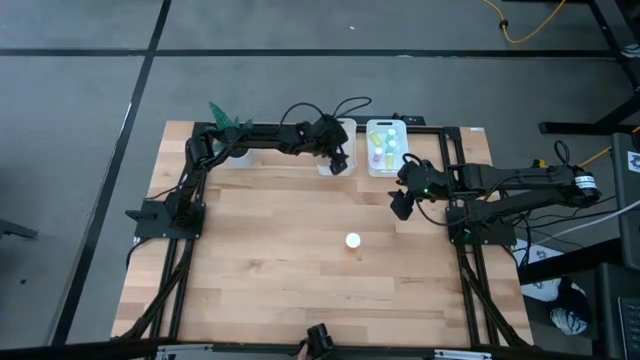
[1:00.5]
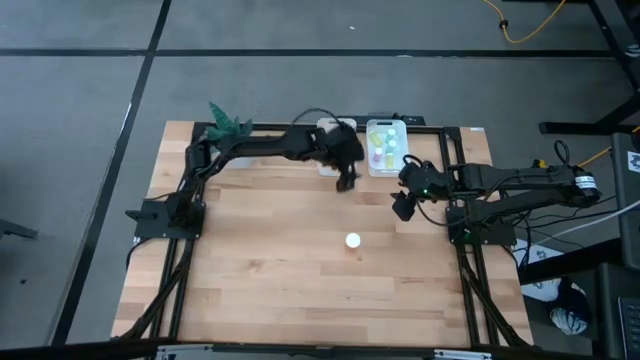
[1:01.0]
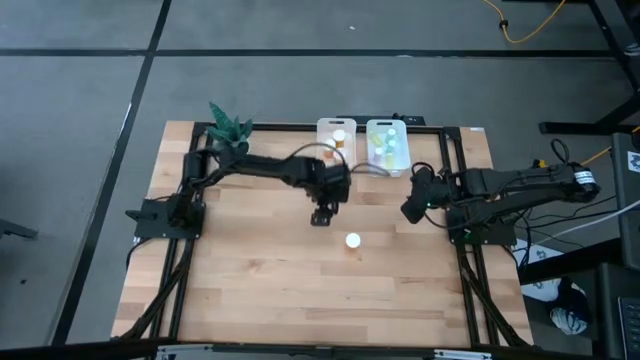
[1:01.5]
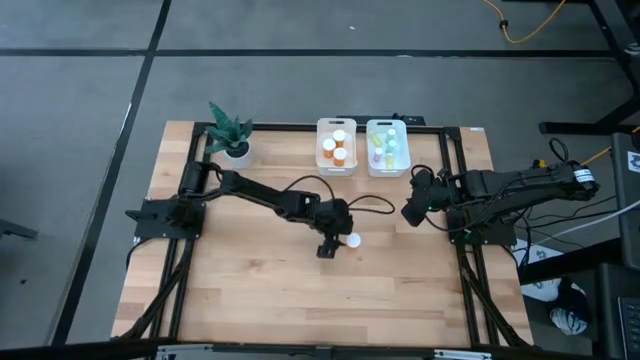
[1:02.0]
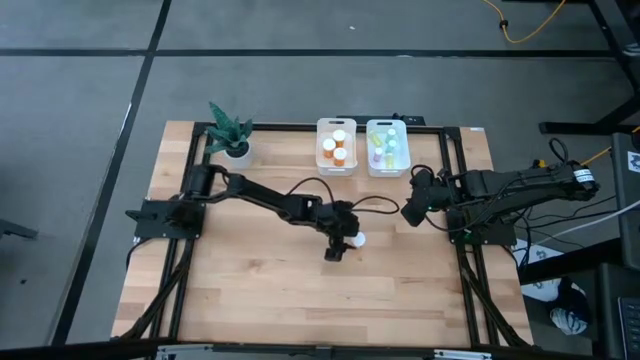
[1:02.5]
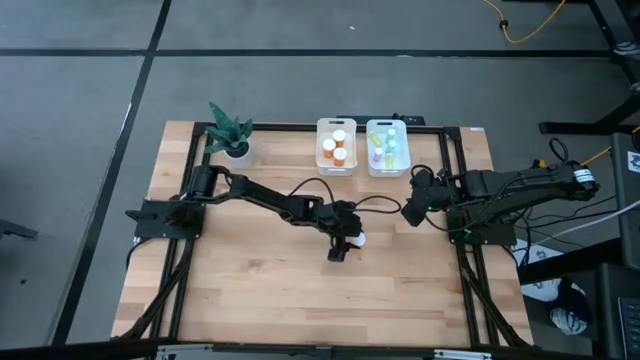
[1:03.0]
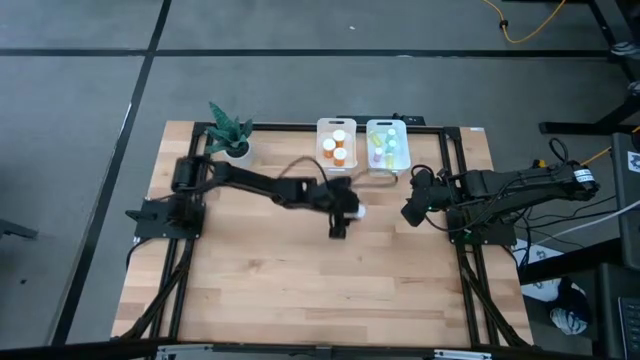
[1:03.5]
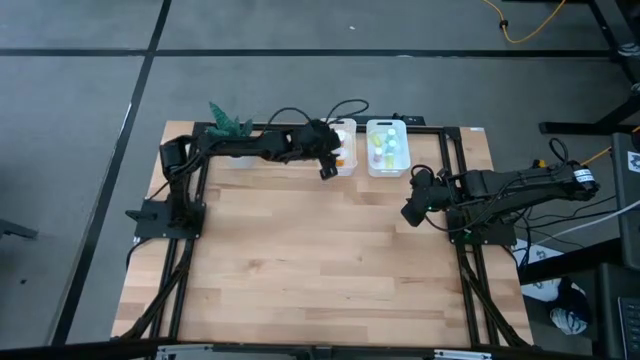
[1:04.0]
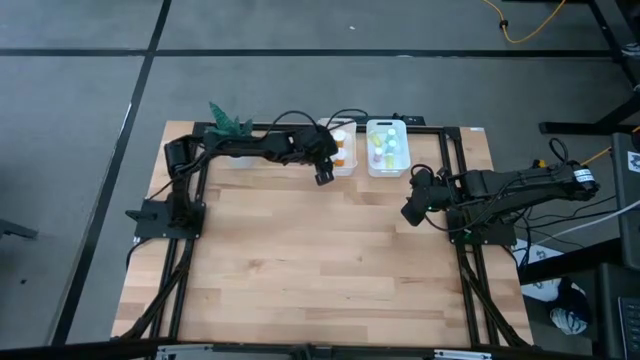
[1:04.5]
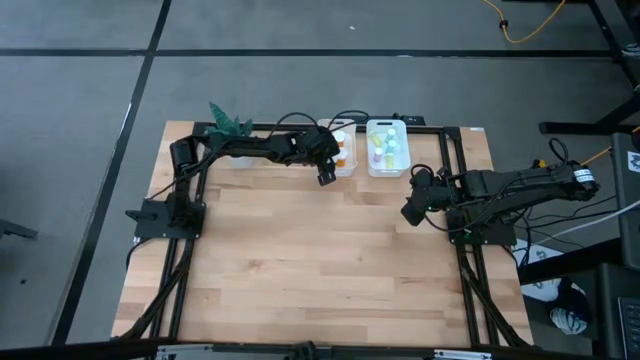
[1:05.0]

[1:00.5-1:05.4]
Task: Pick and place medicine bottles into bin by pill shape (circle, oval)
Put the large orange pill bottle into the left white bin

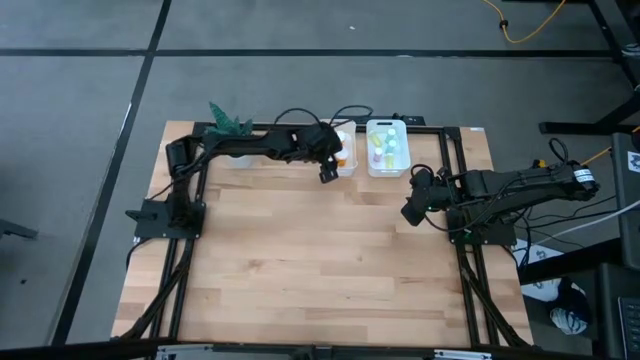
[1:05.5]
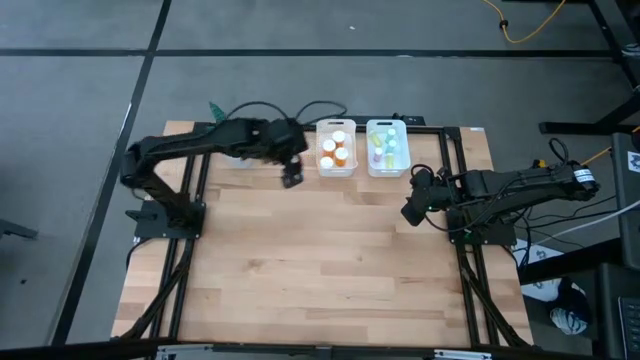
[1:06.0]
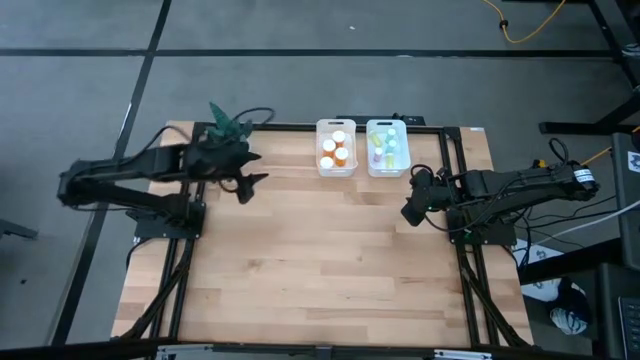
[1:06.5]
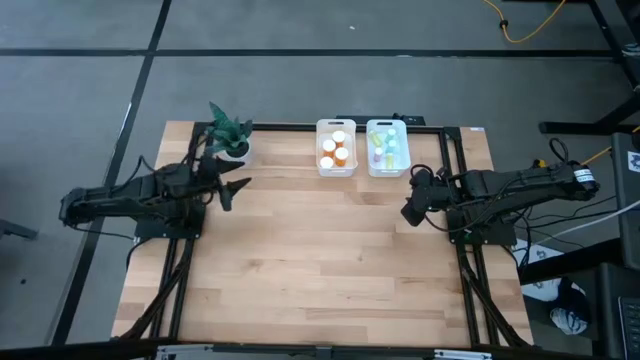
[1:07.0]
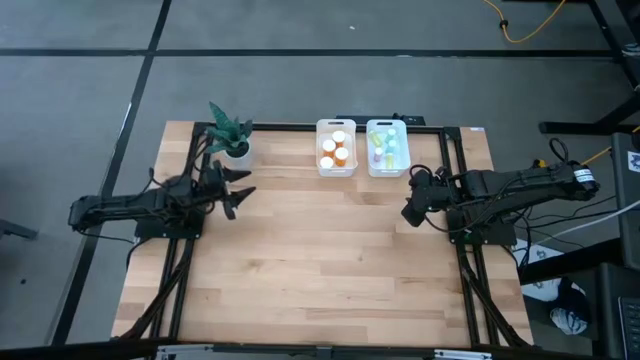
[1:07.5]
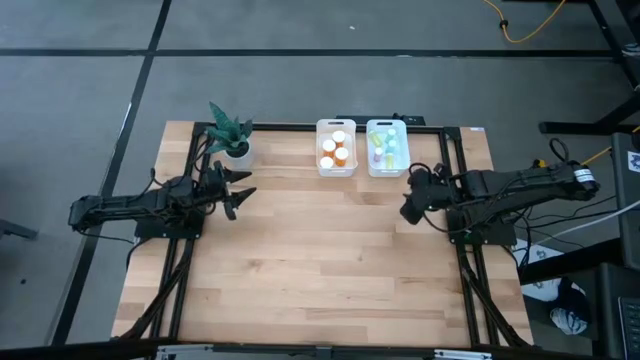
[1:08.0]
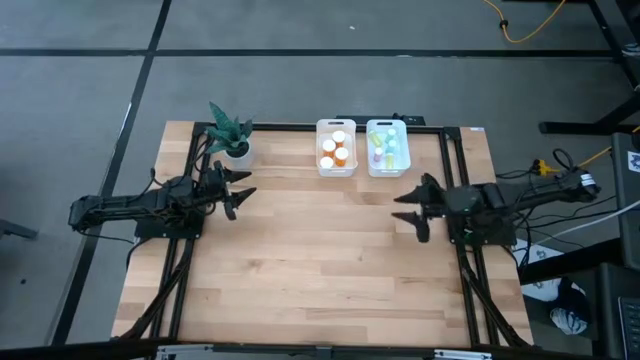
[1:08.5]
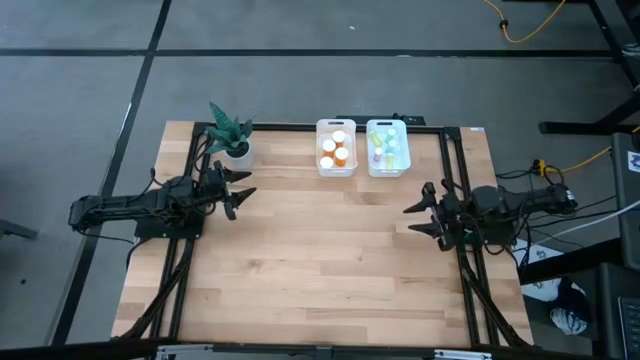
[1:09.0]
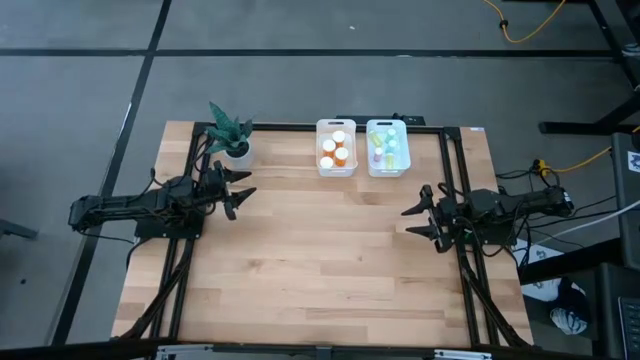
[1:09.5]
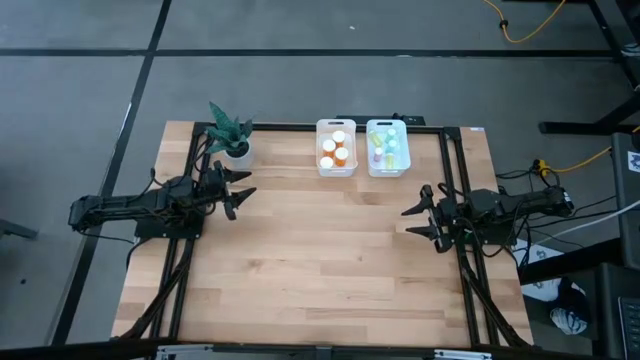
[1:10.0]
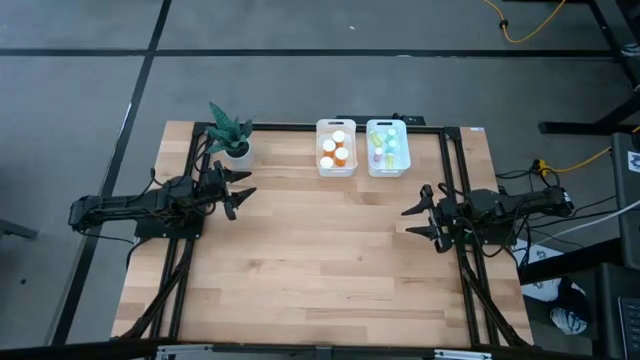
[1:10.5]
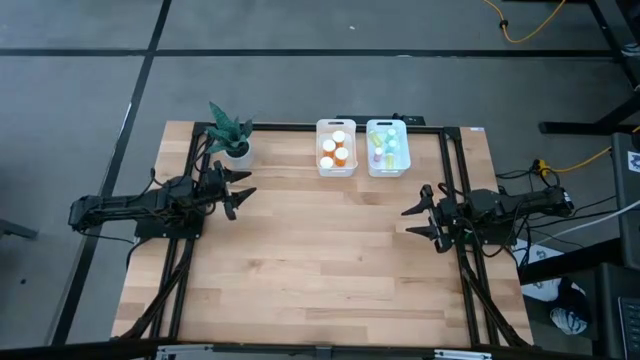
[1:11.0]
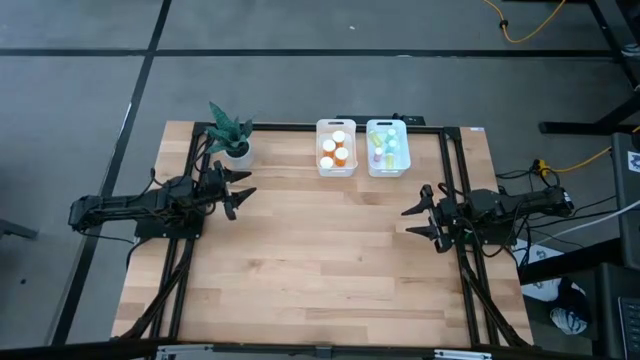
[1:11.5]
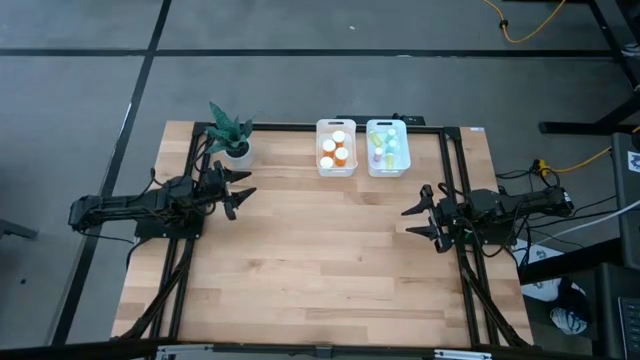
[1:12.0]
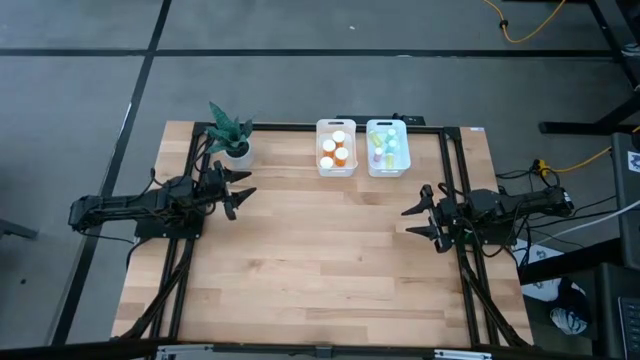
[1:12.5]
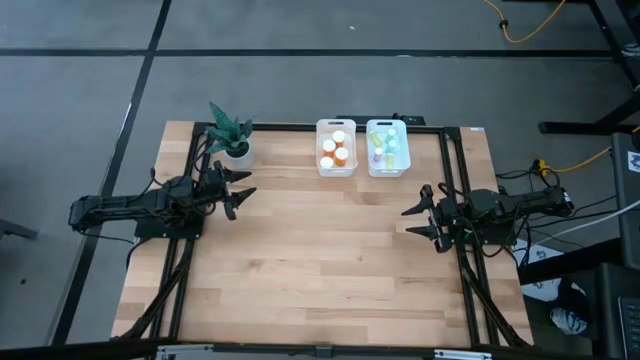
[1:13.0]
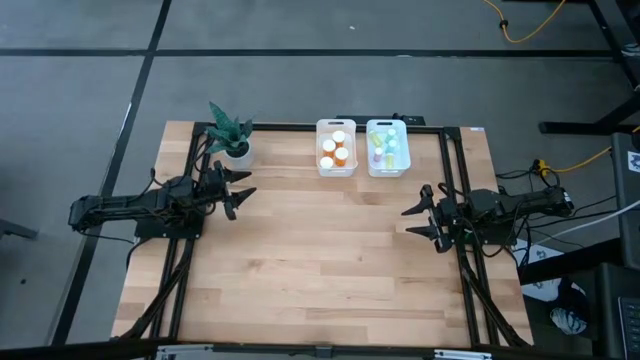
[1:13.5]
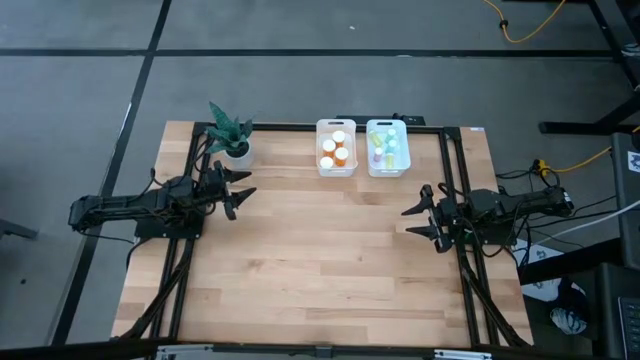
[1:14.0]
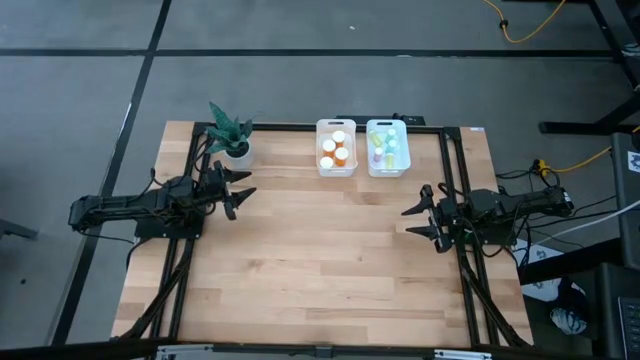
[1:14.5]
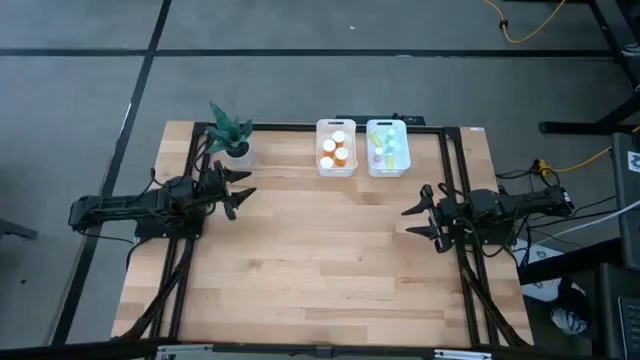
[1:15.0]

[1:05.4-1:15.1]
Return to Home Position

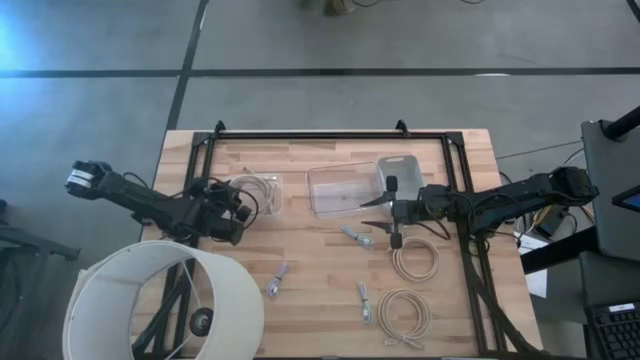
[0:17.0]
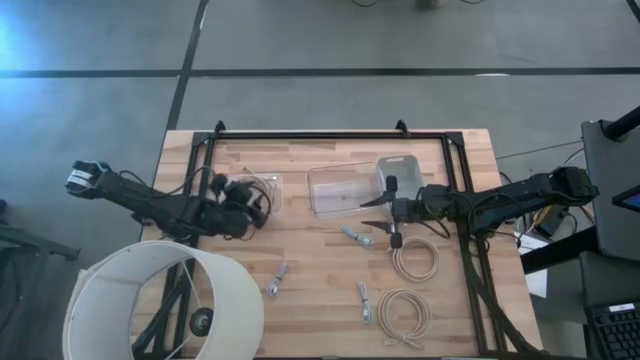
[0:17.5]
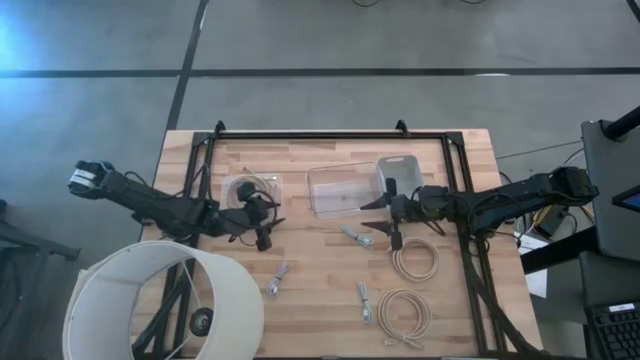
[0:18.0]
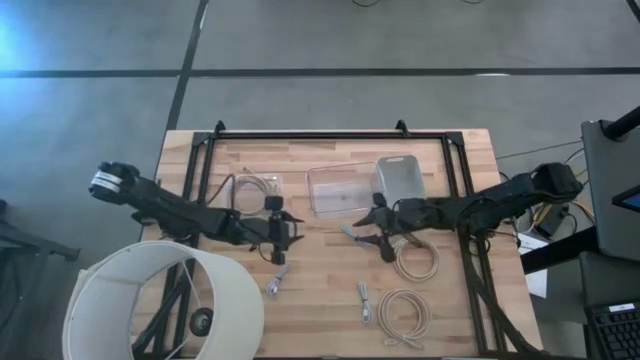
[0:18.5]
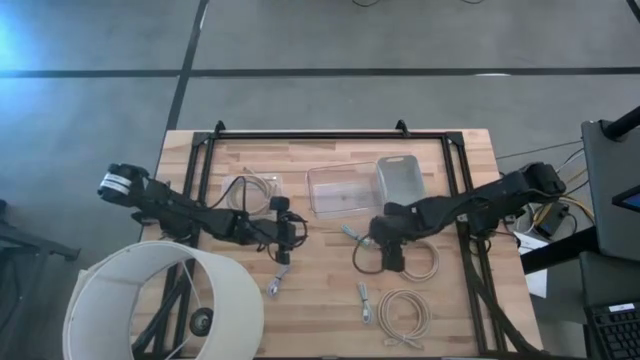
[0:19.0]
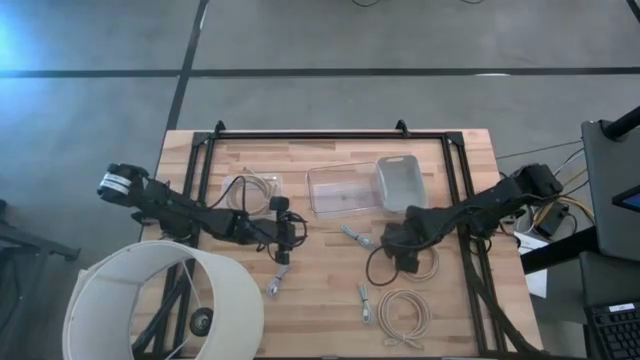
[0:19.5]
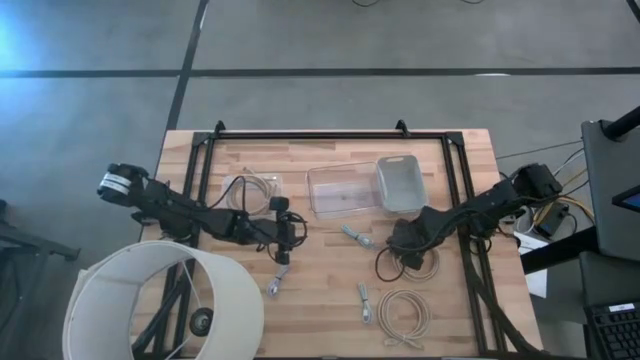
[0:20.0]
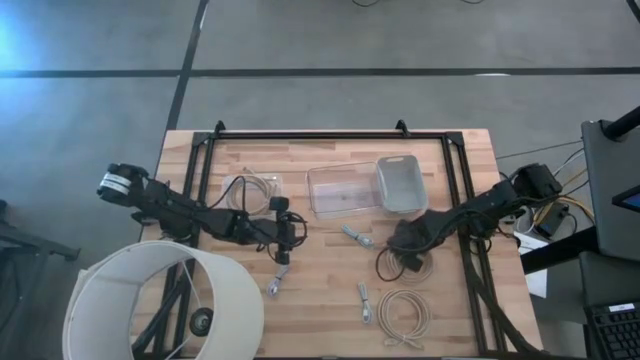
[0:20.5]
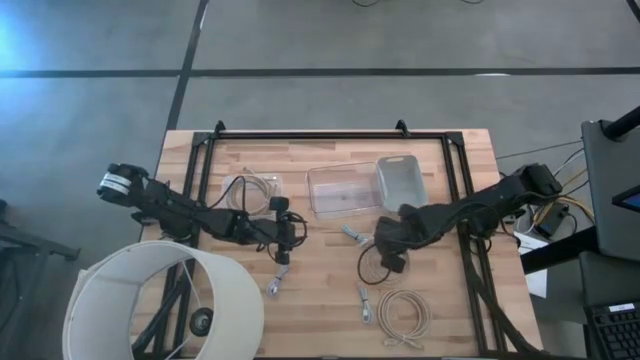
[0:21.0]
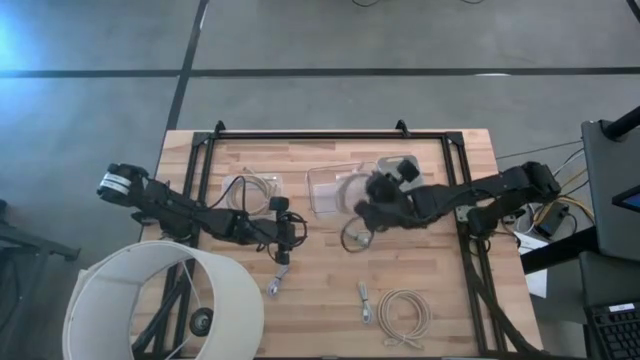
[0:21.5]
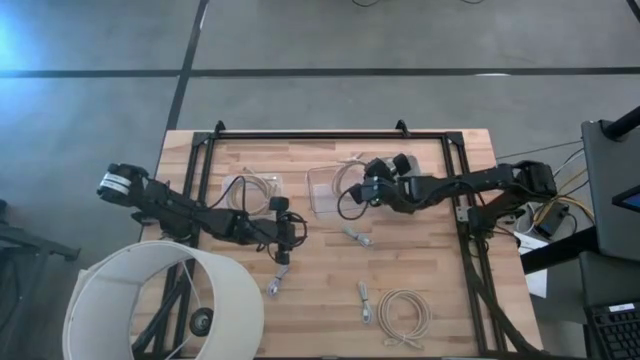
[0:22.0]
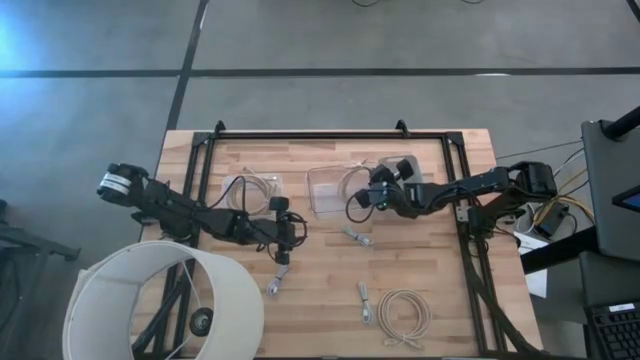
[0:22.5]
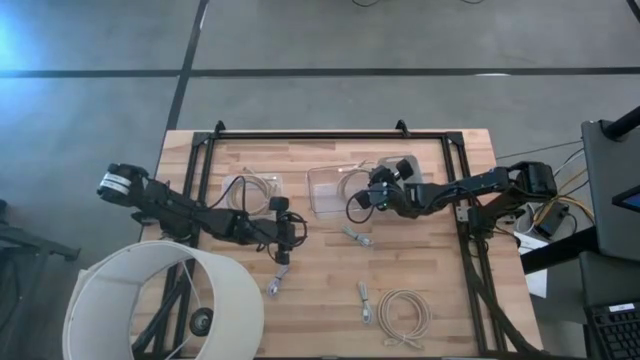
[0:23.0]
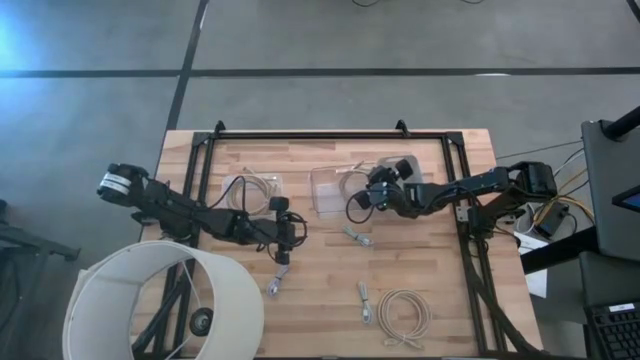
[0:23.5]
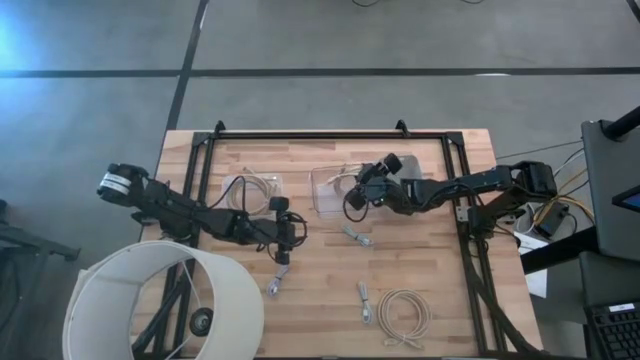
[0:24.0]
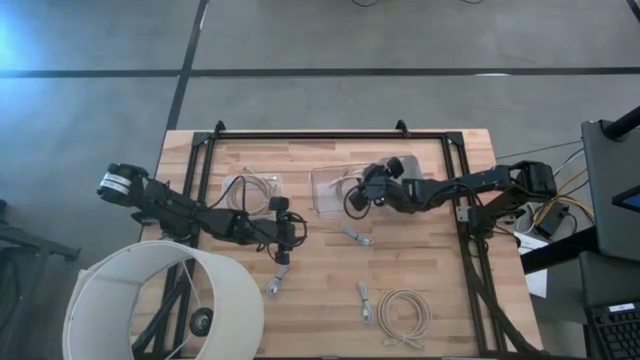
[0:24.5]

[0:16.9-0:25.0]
Task: Pick & Place USB Port
Put the top brown charger cable into the right transparent bin
